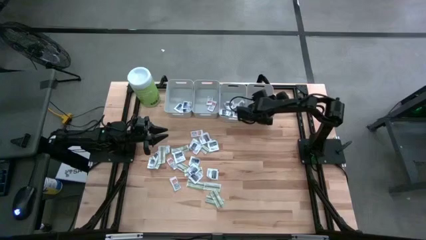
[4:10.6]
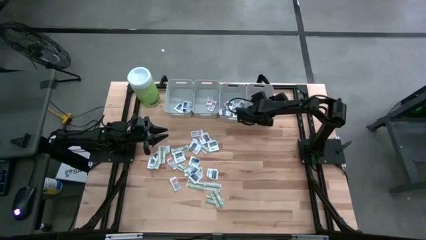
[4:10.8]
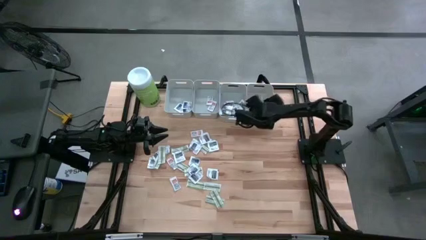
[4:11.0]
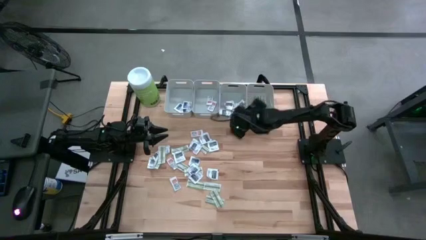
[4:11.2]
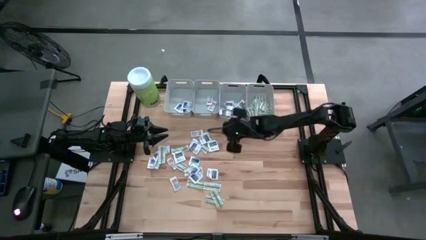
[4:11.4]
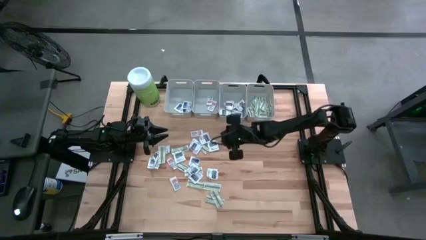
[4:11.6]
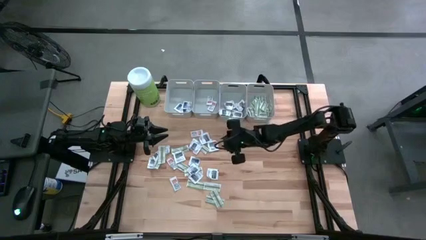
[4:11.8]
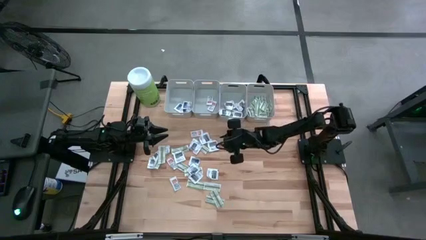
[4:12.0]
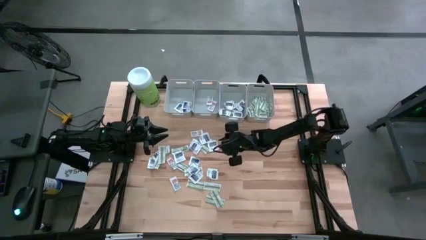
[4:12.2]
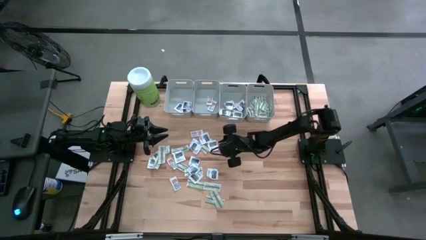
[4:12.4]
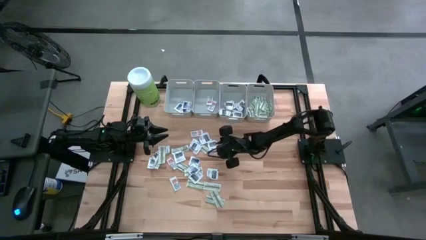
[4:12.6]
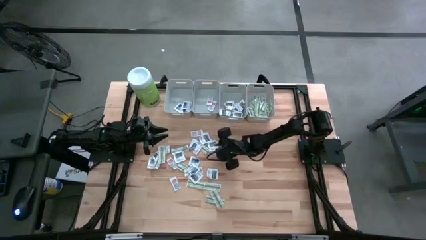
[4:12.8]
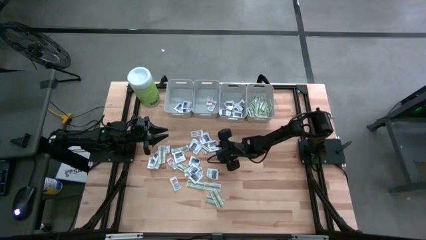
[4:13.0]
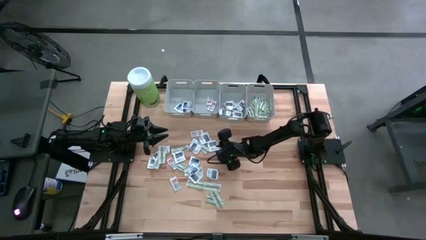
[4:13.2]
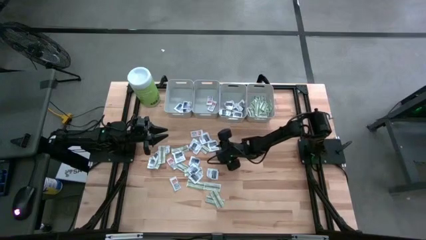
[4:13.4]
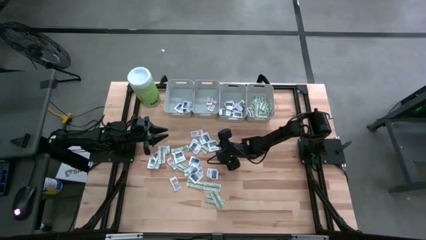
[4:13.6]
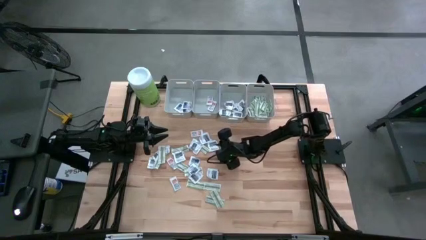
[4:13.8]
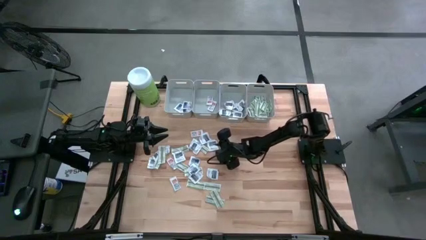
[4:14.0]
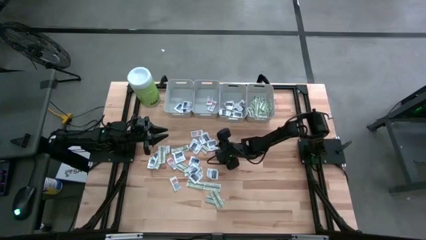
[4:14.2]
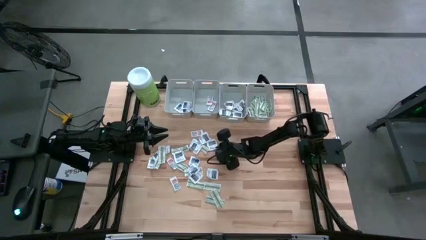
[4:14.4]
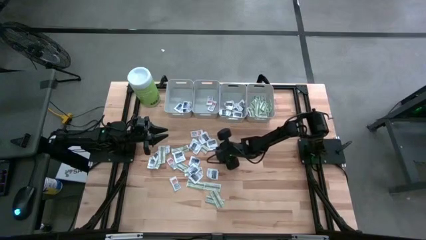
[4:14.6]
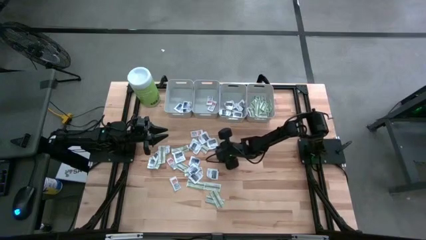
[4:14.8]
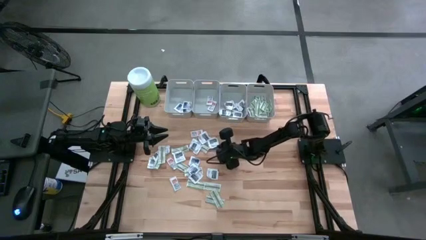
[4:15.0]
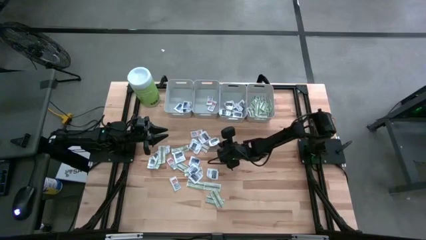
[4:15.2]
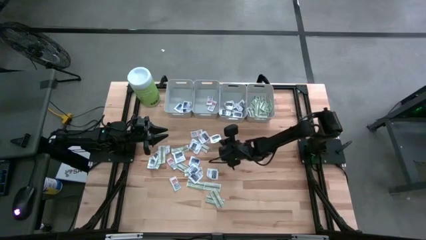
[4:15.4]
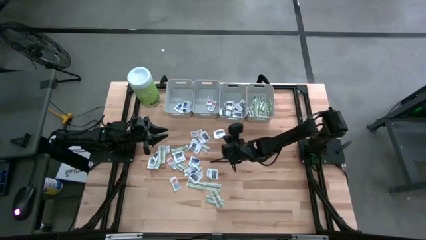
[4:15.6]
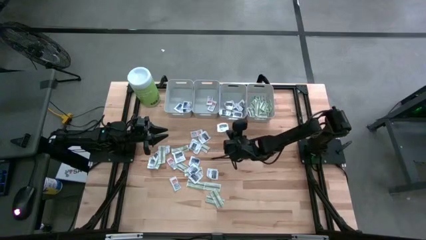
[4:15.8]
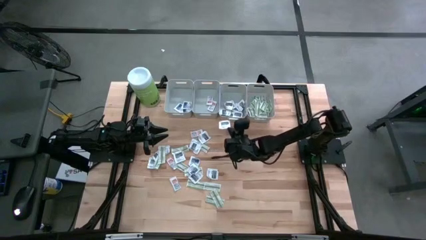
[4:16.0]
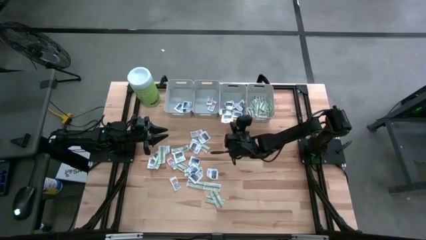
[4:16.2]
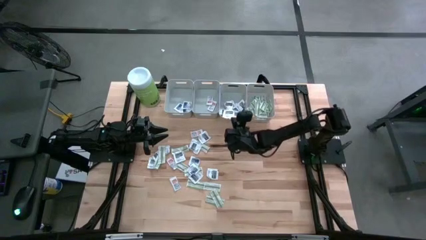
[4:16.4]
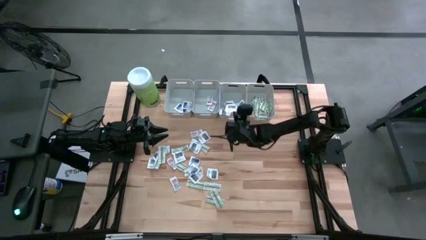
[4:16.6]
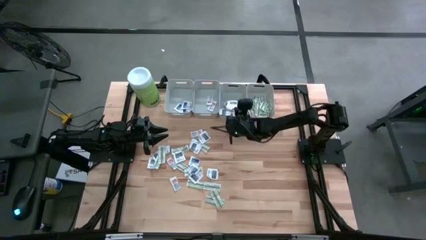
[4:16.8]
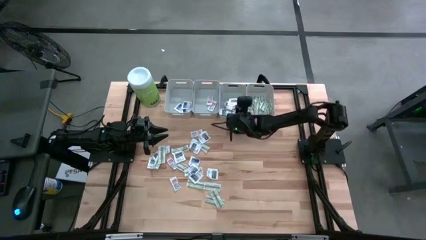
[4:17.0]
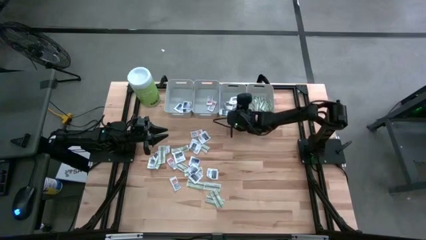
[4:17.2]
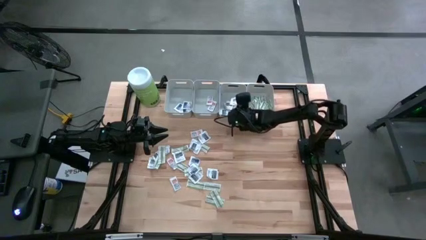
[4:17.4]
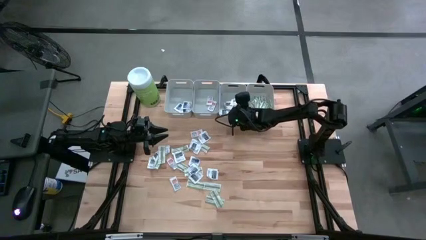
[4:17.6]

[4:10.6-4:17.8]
Task: Pick & Place First Aid Supplies
Put the towelette pack into the middle right gray bin

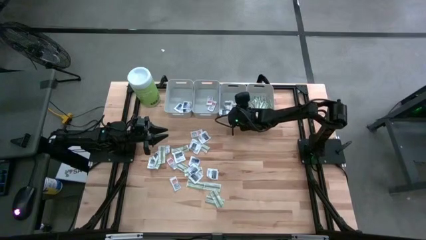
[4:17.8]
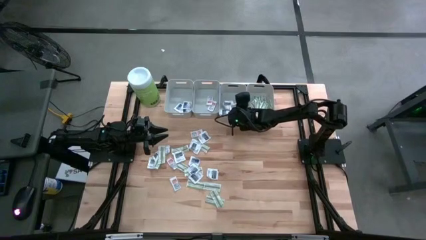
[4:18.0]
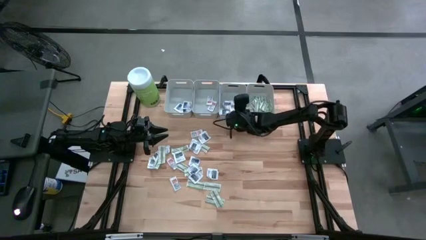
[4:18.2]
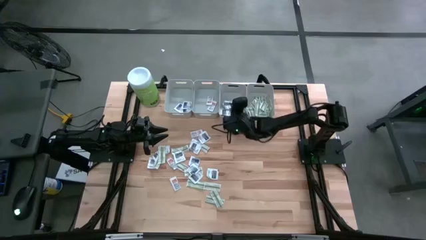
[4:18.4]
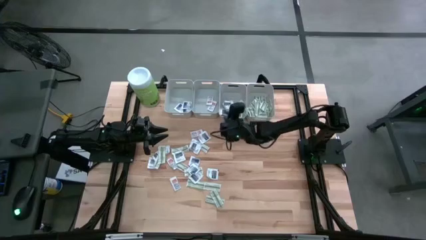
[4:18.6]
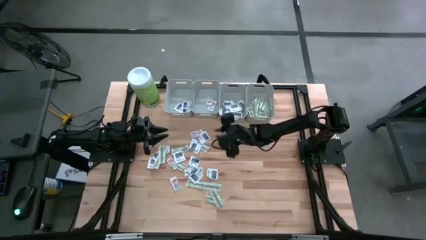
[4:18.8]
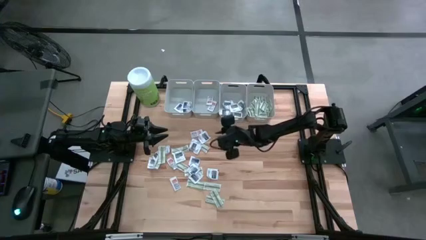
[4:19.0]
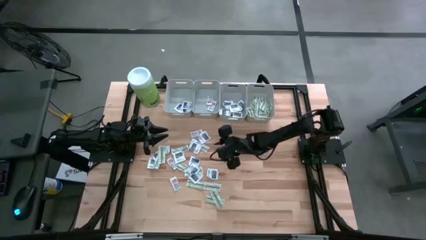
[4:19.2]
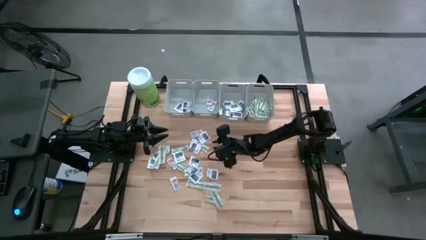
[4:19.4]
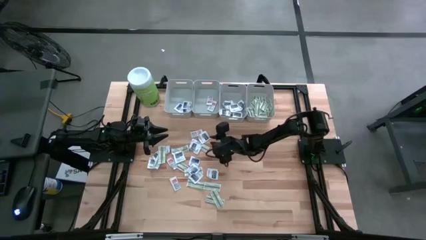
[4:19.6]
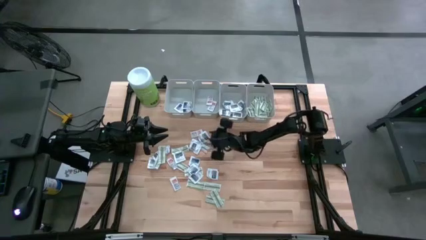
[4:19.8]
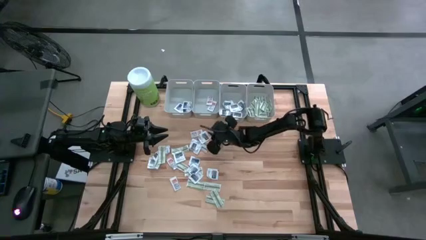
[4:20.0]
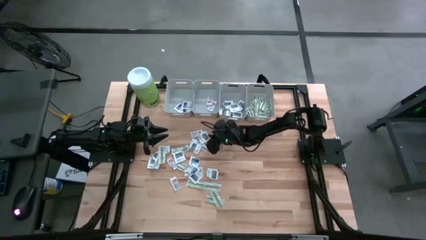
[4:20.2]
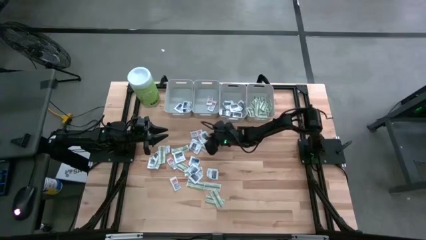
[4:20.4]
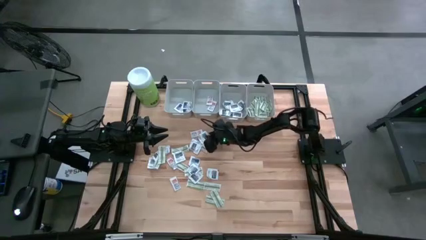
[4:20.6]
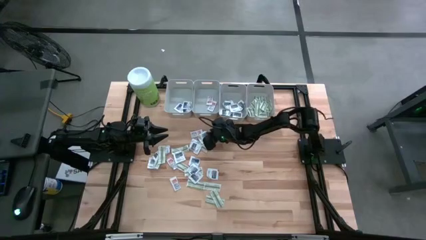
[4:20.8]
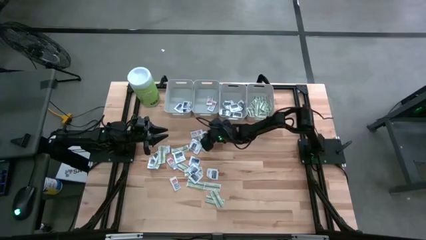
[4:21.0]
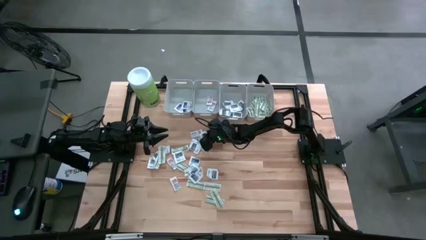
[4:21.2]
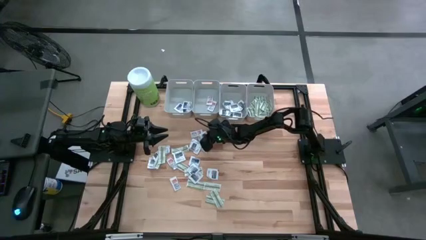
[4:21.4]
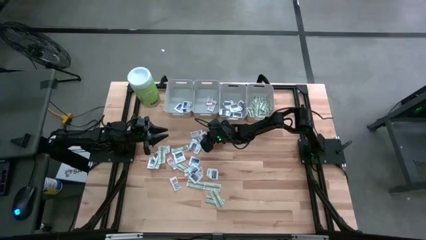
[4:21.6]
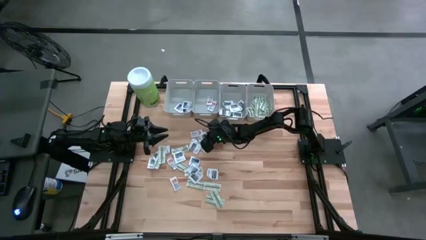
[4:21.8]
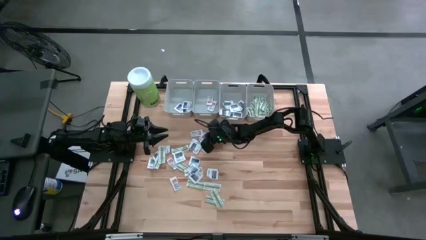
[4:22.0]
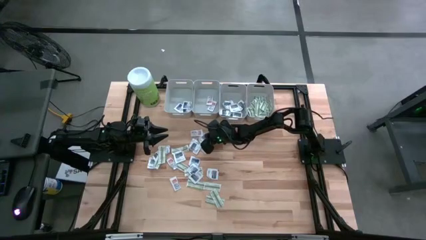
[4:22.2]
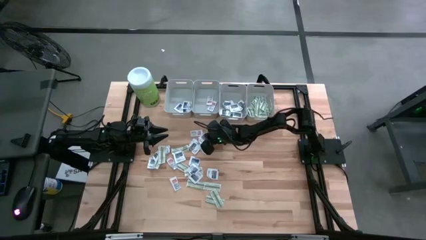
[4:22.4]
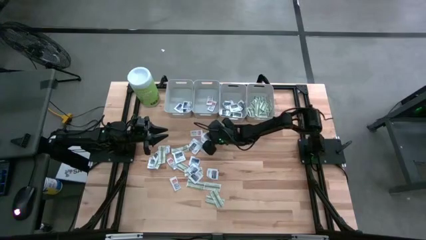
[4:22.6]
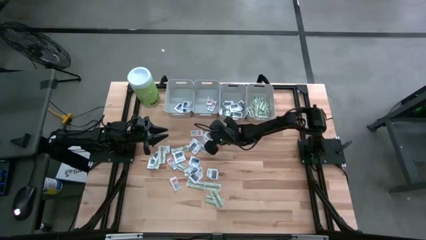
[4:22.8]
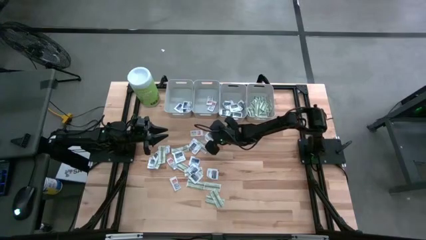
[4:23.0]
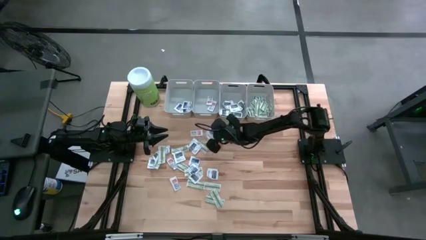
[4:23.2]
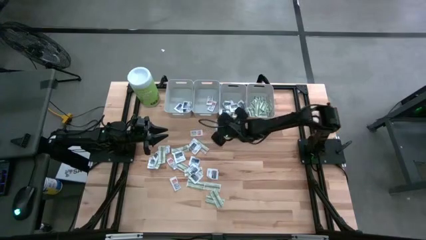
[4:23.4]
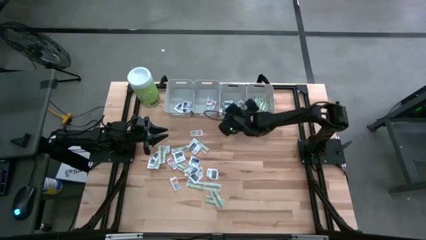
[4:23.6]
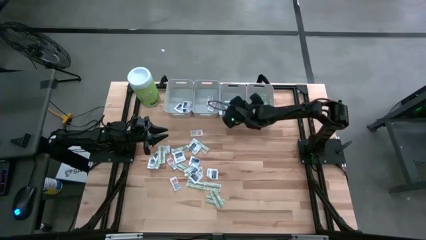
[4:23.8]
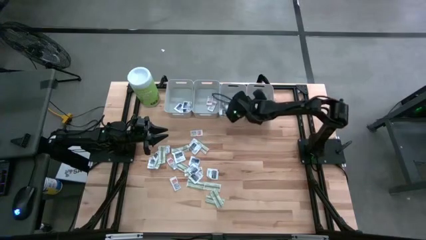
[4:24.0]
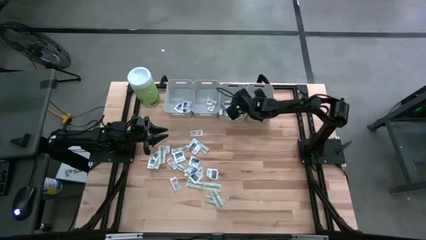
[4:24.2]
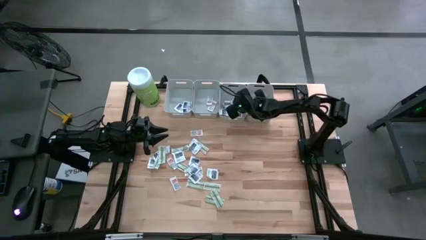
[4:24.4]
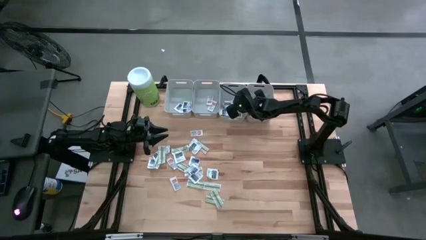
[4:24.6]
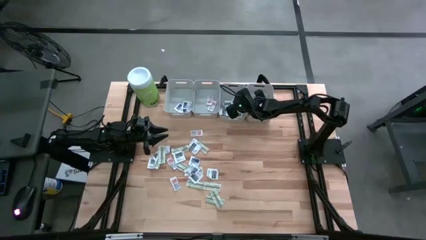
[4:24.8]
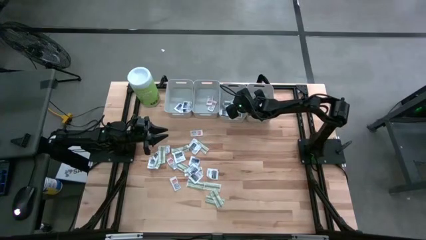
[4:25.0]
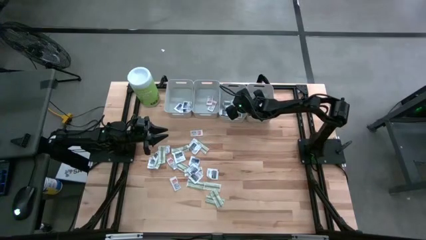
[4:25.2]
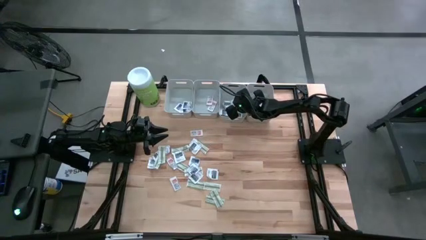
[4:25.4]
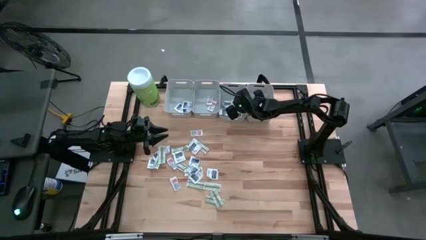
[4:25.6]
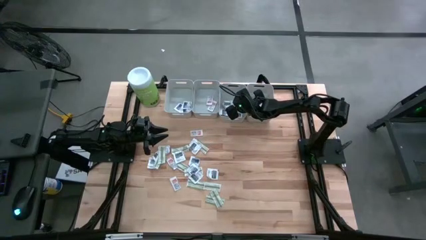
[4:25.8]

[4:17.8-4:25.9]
Put the towelette pack into the middle right gray bin
